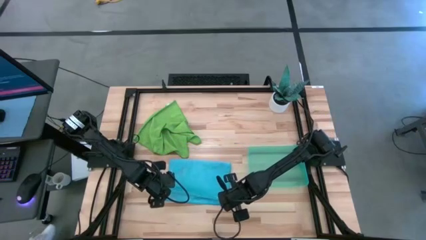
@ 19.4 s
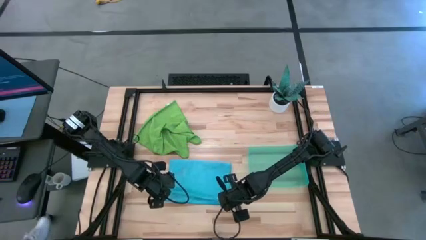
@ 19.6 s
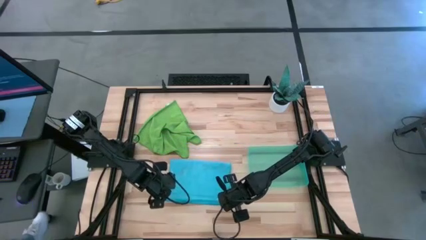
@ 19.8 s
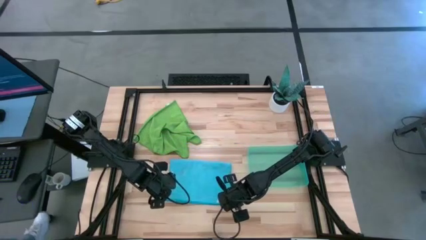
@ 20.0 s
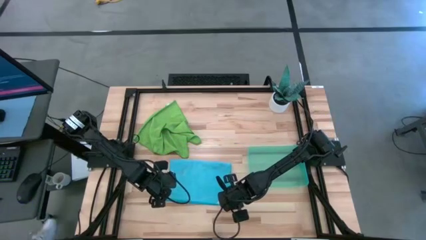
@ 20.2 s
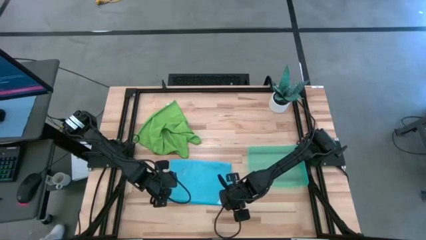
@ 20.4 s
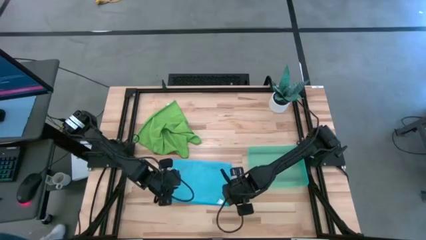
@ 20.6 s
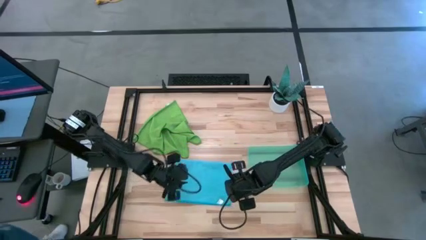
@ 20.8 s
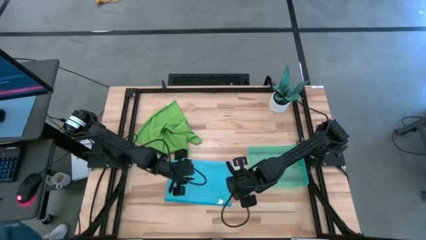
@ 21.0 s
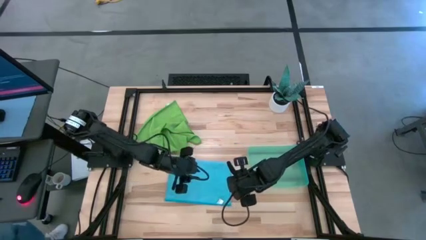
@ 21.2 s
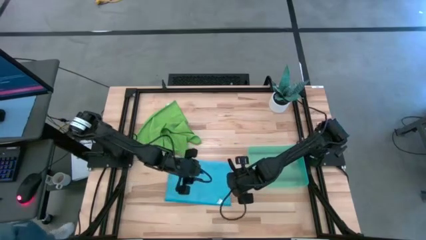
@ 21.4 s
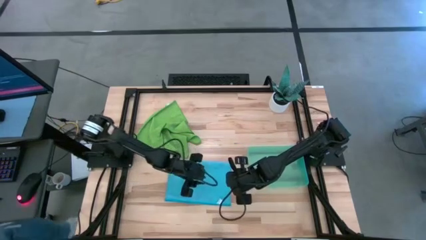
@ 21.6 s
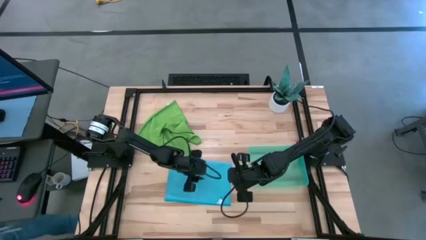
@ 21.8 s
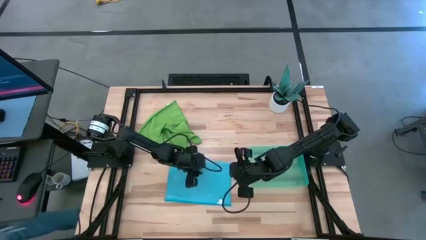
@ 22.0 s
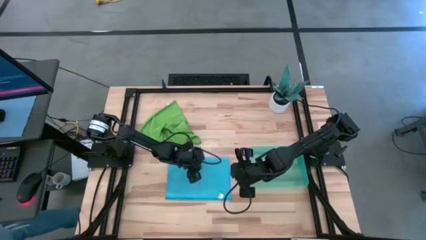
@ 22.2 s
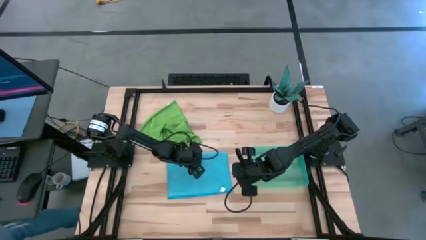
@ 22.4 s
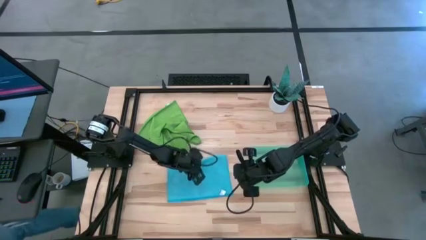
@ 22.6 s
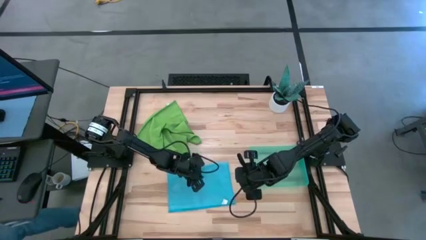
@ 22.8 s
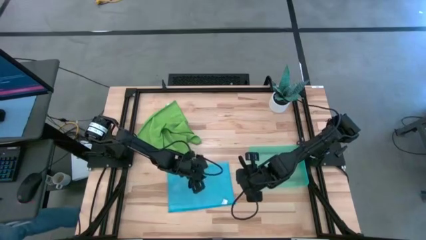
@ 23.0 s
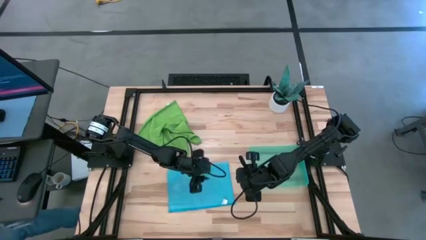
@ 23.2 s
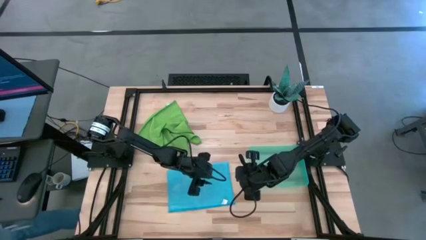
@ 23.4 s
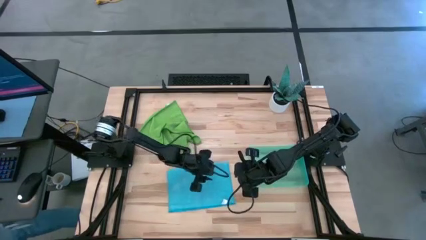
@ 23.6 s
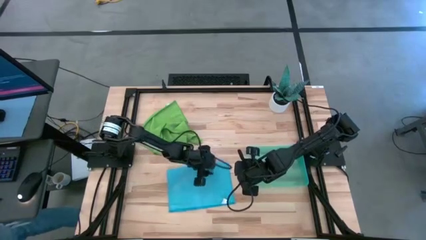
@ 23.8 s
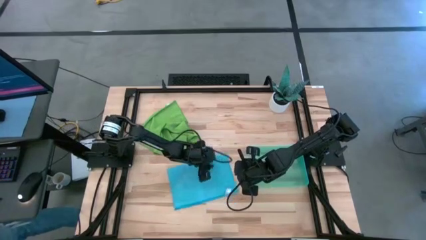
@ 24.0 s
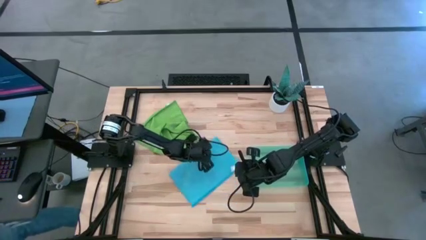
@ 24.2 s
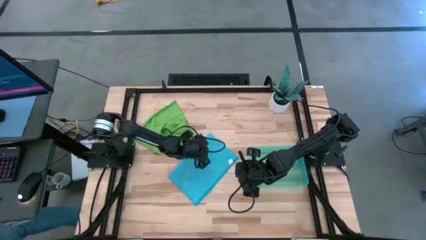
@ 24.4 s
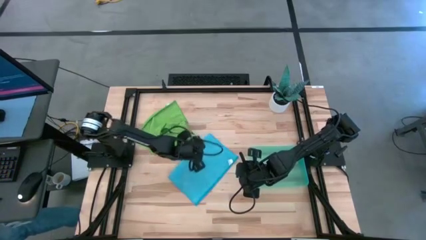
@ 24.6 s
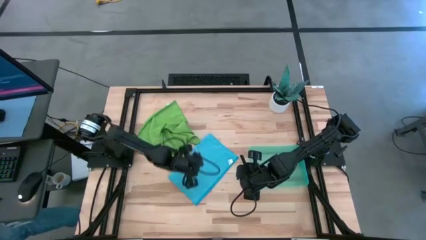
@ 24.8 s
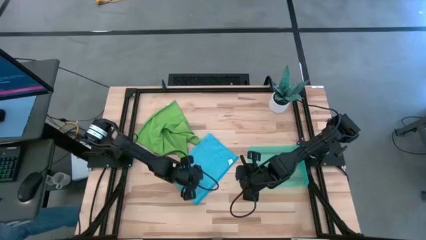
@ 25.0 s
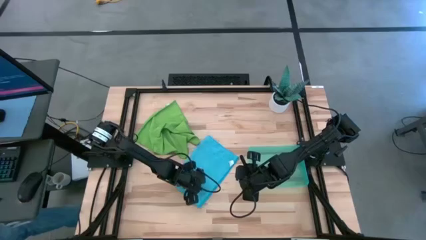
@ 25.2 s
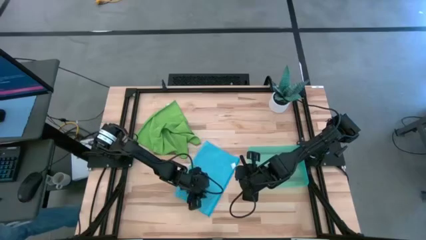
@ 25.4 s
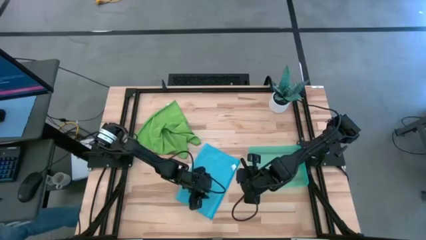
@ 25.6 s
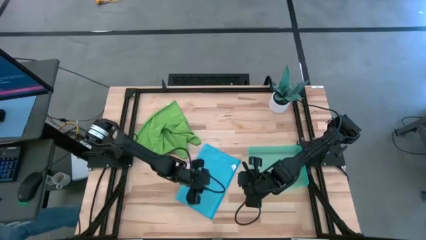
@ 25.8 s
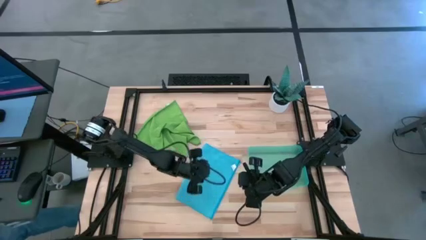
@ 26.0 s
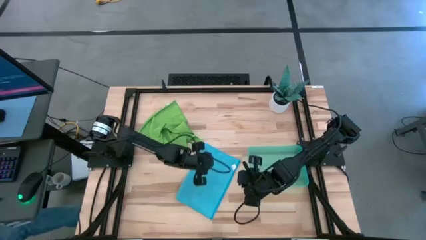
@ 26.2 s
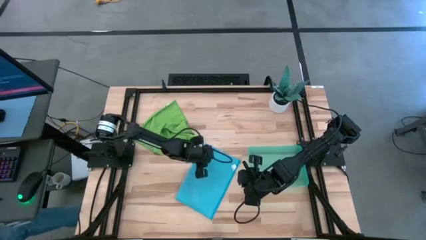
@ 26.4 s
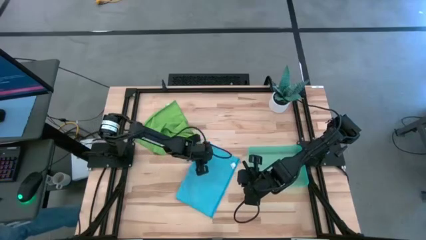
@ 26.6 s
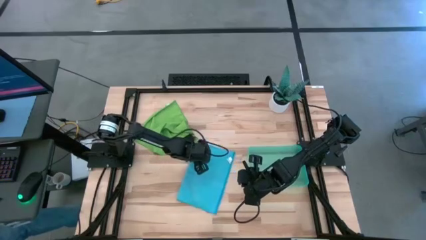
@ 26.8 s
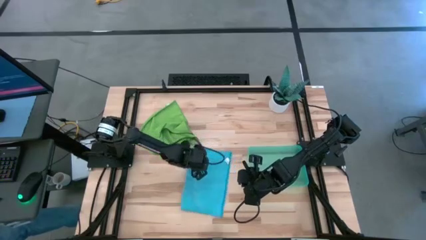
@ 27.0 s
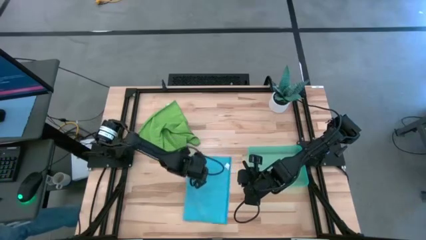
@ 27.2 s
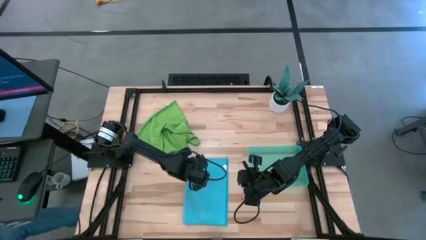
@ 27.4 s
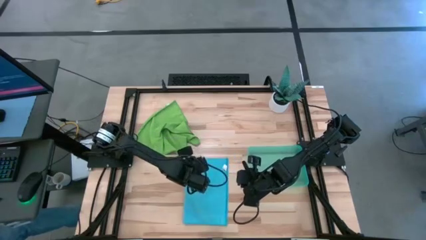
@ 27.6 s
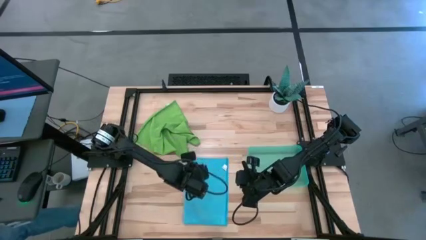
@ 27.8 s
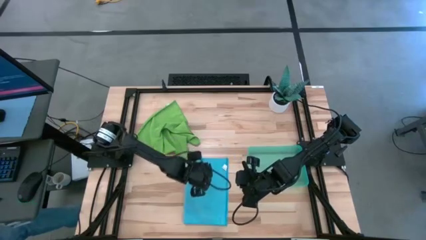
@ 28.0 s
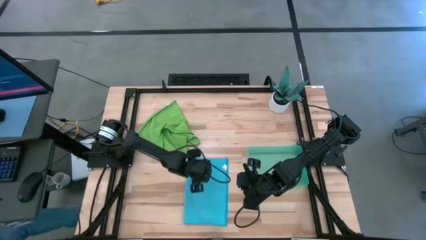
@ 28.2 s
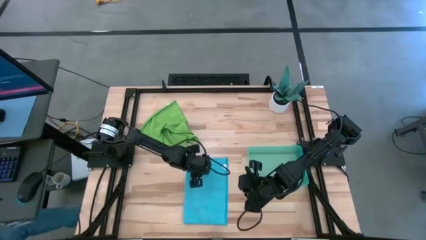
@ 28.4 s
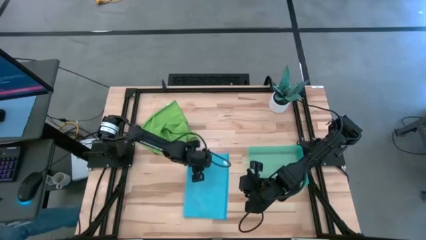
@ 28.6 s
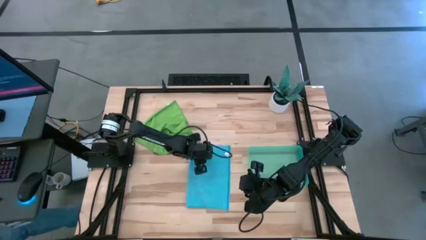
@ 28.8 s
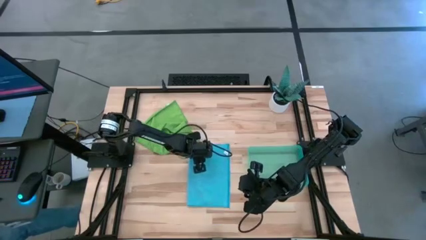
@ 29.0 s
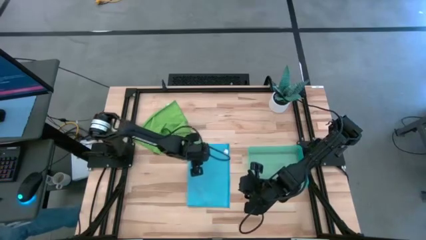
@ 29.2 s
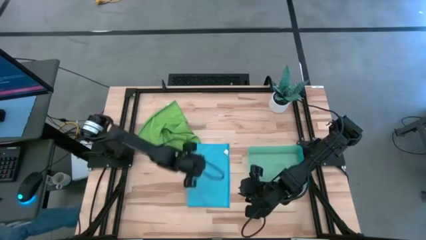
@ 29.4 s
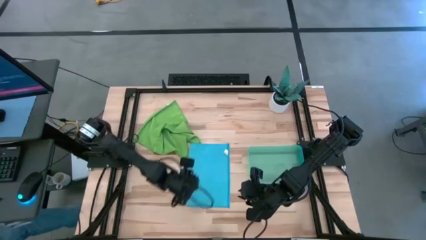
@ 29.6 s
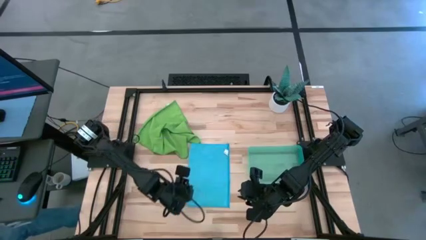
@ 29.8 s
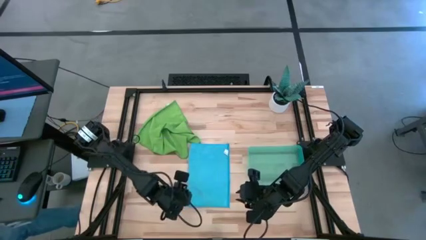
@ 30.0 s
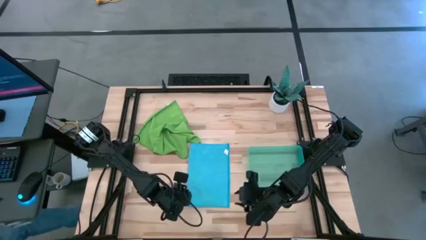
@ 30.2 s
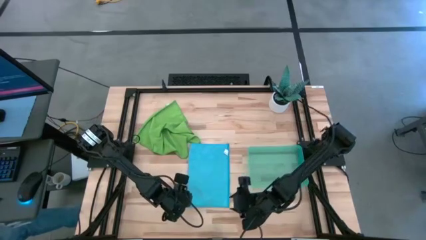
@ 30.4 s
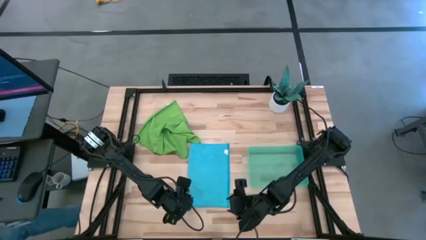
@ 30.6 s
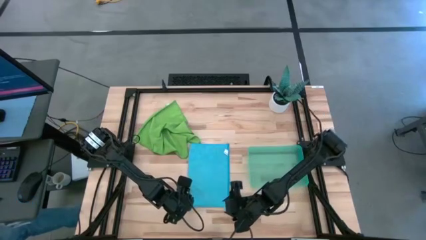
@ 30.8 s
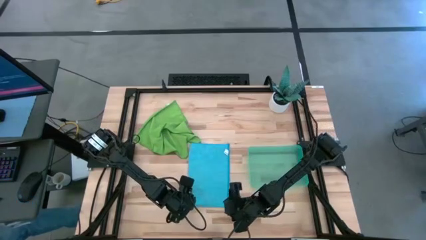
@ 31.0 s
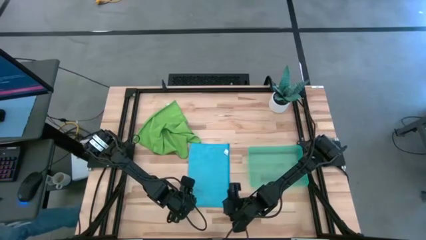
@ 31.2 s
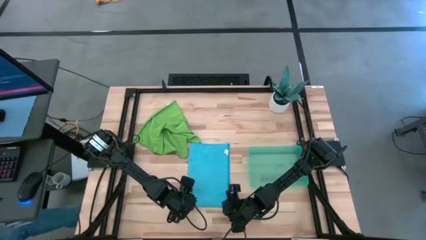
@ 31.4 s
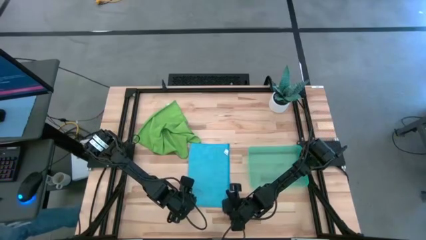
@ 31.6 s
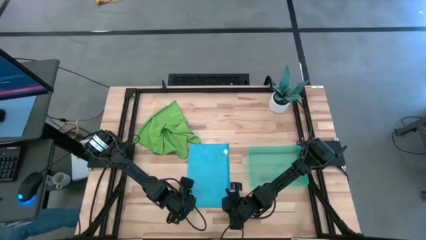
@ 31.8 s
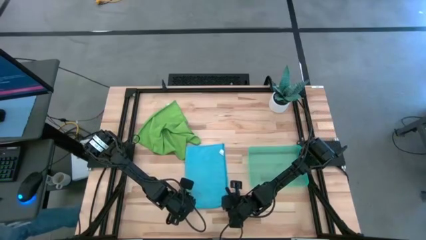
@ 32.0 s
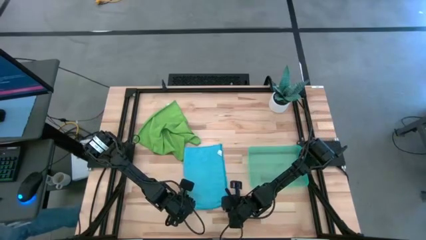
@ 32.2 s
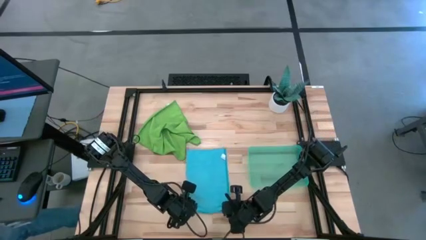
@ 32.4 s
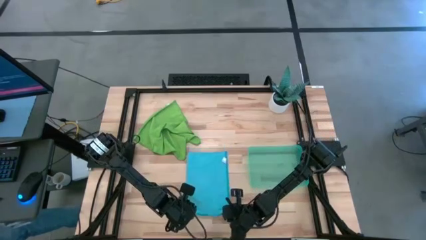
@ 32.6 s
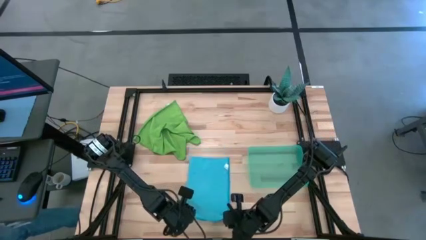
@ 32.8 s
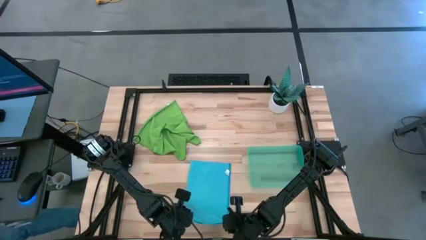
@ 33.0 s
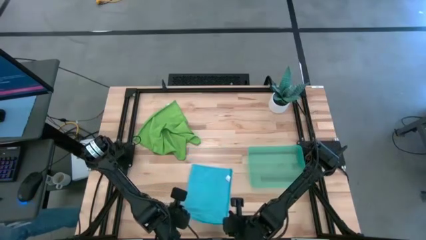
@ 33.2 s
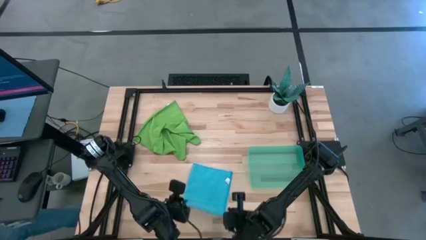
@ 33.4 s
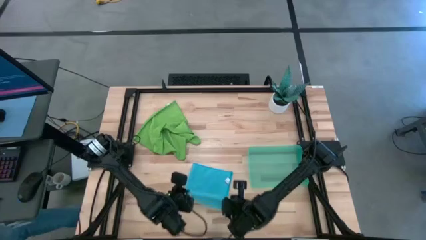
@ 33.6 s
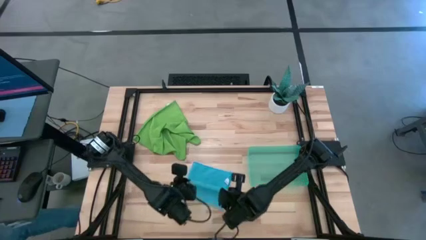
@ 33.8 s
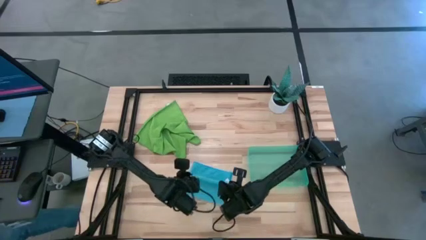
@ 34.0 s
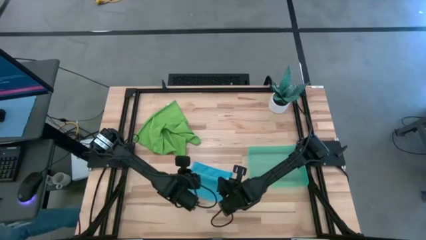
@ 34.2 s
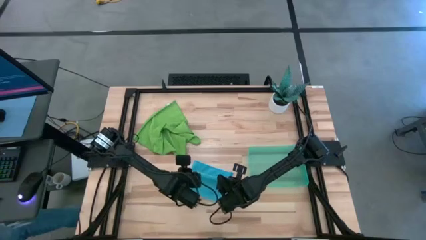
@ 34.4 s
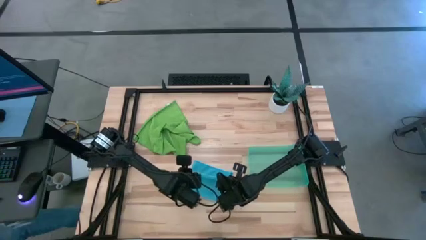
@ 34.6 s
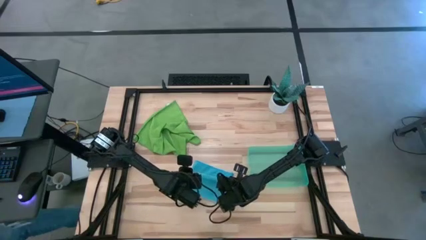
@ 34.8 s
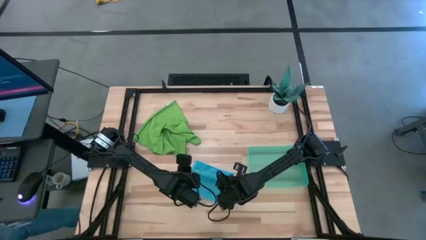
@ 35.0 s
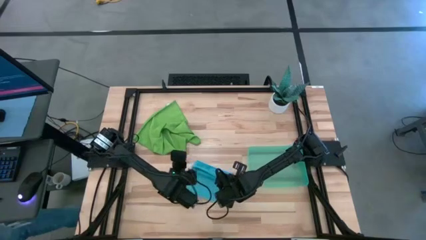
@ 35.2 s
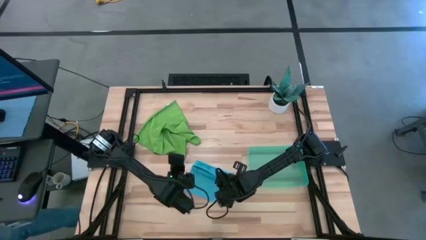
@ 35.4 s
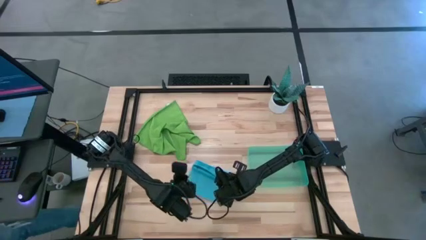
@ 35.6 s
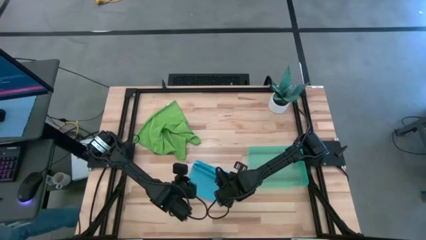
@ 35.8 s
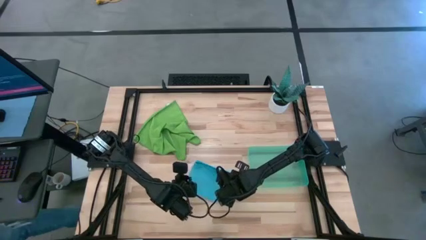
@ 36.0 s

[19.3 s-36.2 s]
Task: Roll microfiber towels into tight, uniform cylinder then place into a basket
Fold the blue microfiber towel
